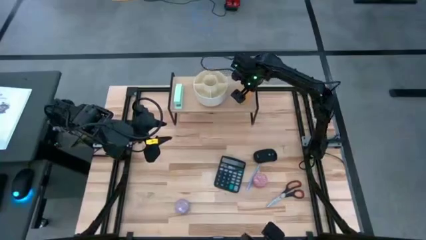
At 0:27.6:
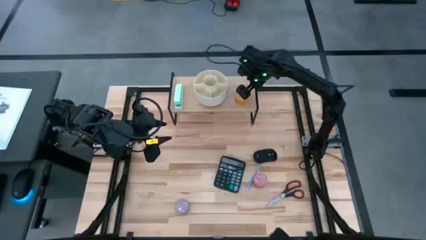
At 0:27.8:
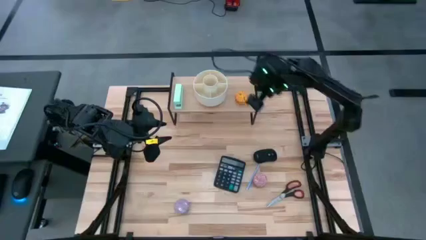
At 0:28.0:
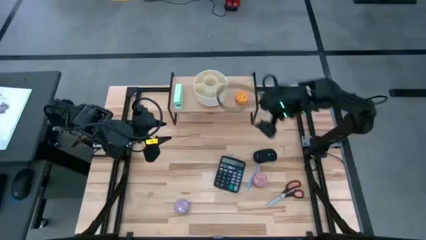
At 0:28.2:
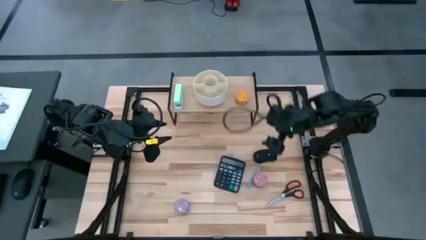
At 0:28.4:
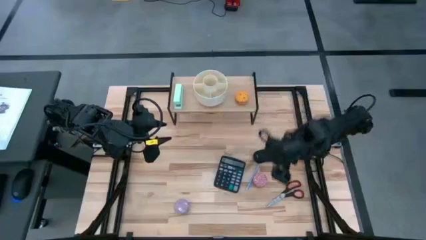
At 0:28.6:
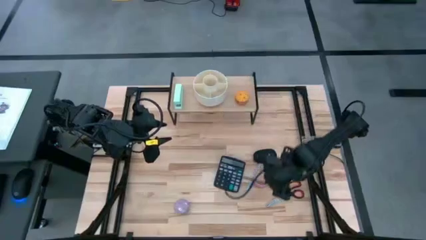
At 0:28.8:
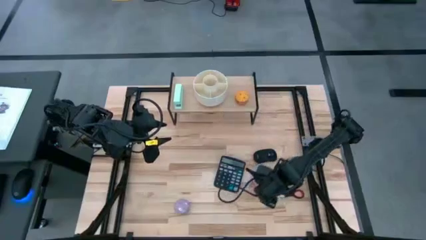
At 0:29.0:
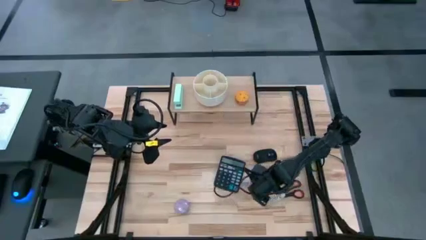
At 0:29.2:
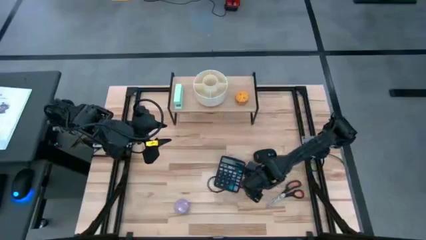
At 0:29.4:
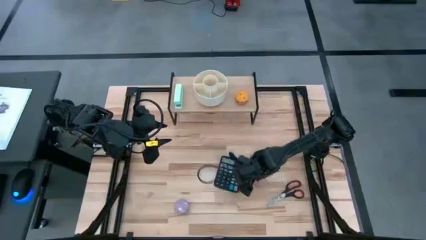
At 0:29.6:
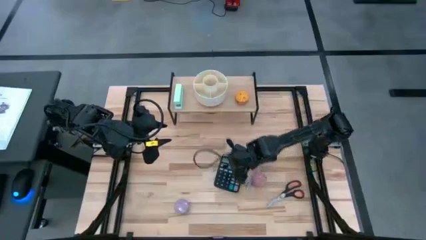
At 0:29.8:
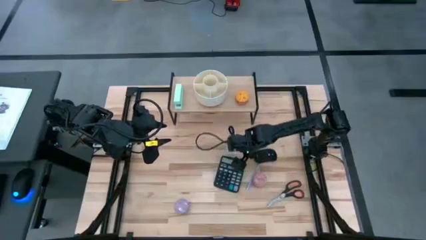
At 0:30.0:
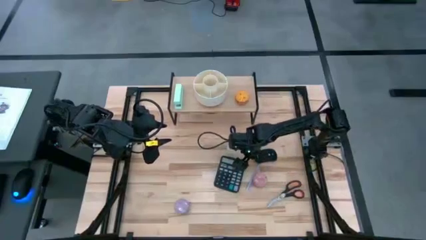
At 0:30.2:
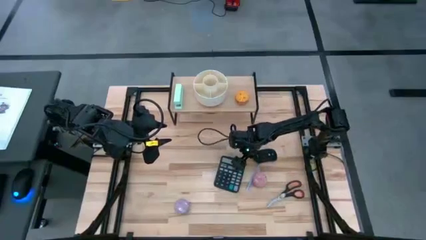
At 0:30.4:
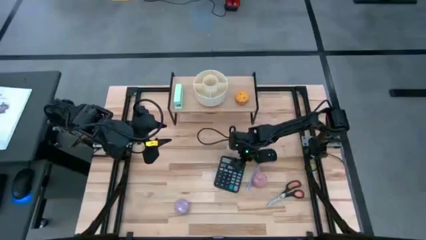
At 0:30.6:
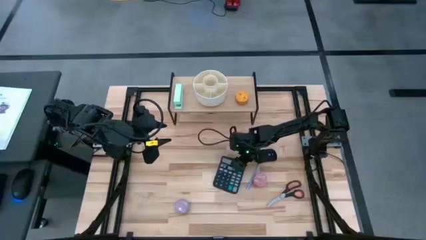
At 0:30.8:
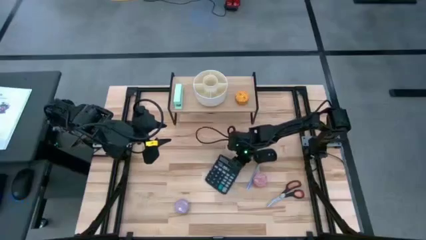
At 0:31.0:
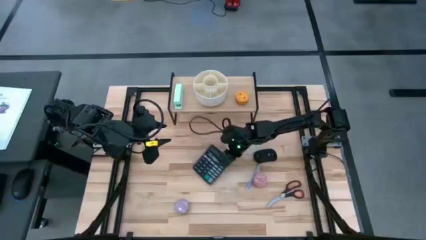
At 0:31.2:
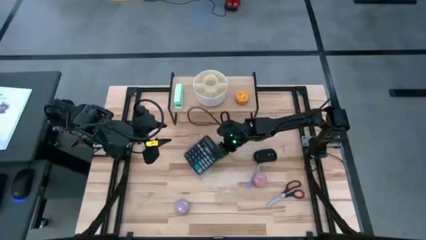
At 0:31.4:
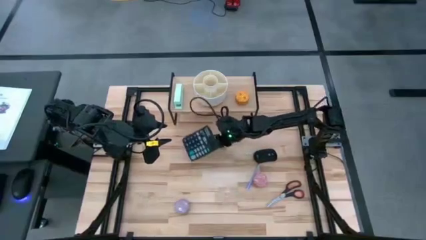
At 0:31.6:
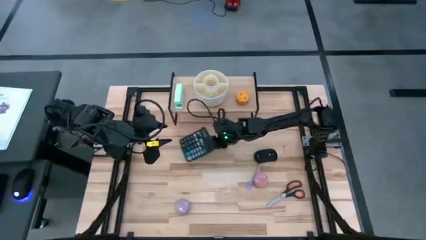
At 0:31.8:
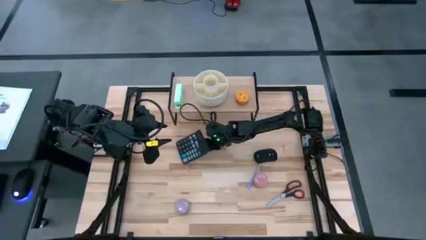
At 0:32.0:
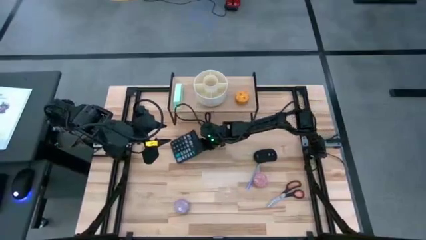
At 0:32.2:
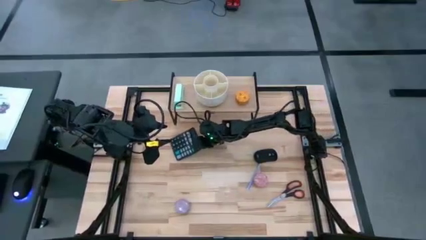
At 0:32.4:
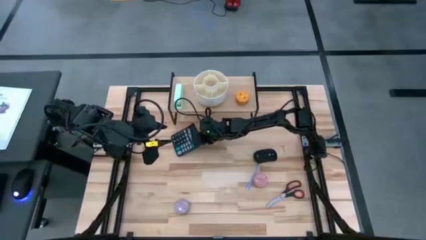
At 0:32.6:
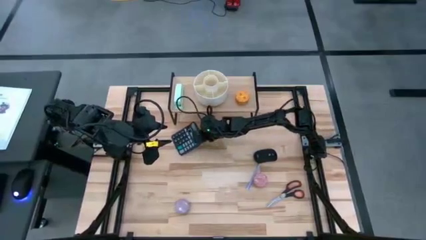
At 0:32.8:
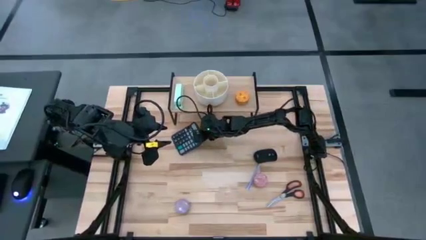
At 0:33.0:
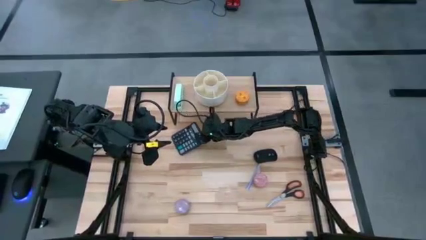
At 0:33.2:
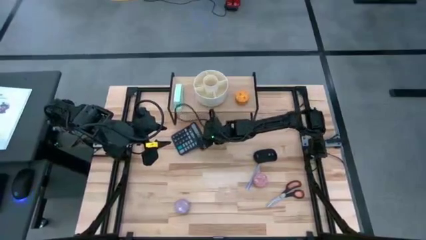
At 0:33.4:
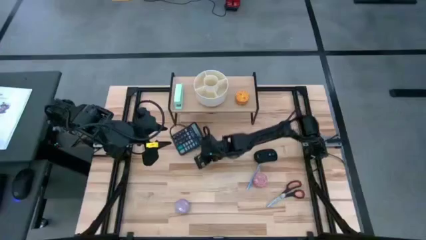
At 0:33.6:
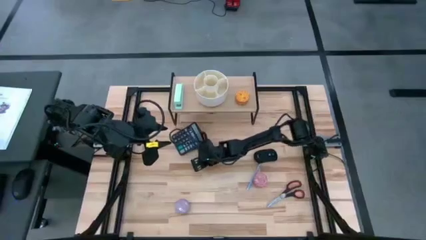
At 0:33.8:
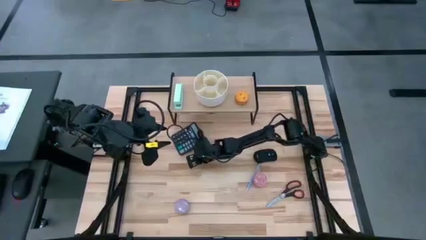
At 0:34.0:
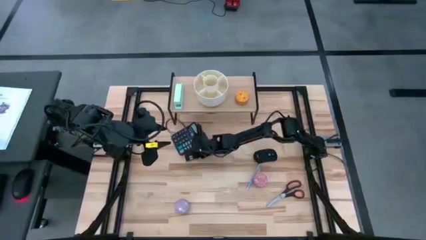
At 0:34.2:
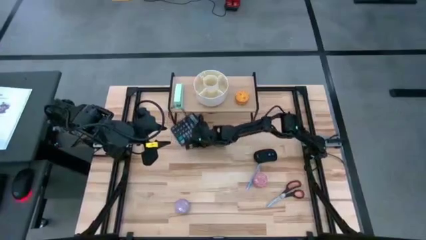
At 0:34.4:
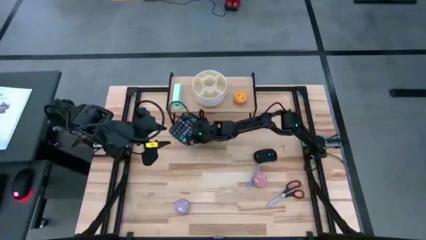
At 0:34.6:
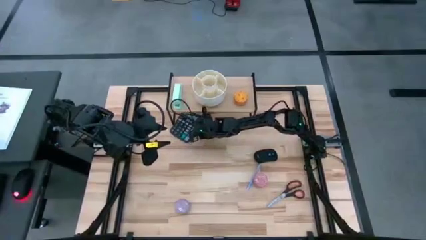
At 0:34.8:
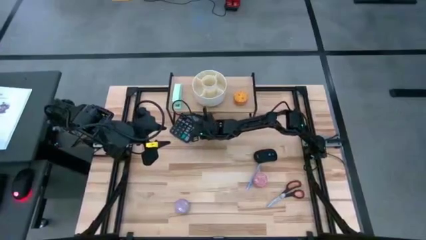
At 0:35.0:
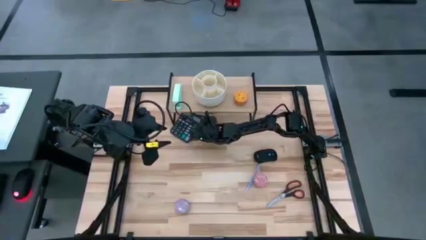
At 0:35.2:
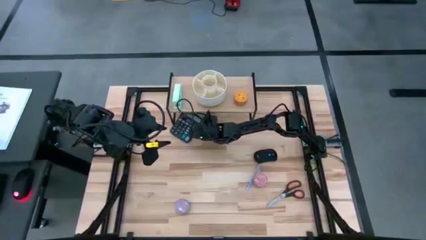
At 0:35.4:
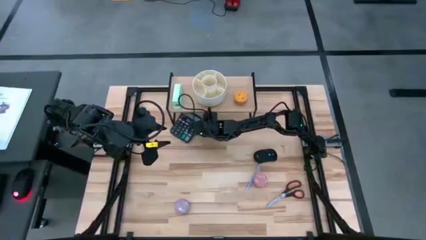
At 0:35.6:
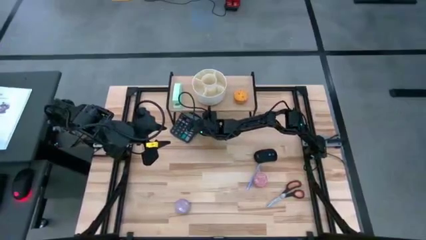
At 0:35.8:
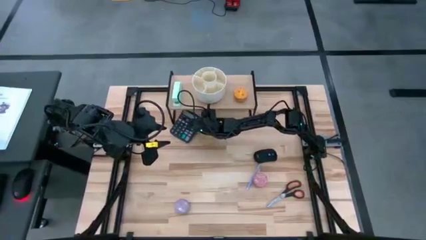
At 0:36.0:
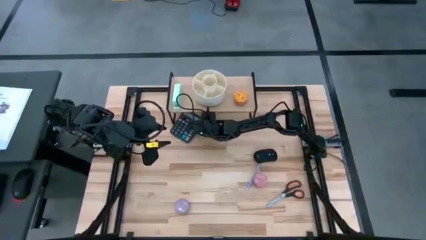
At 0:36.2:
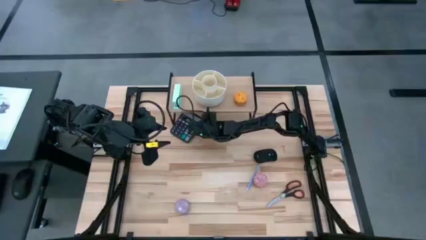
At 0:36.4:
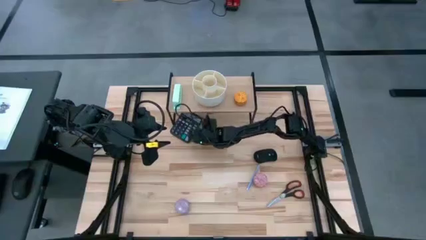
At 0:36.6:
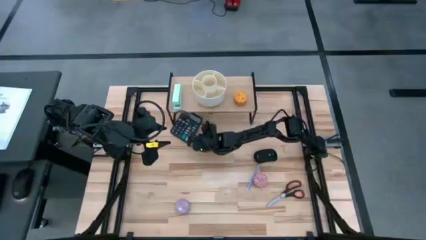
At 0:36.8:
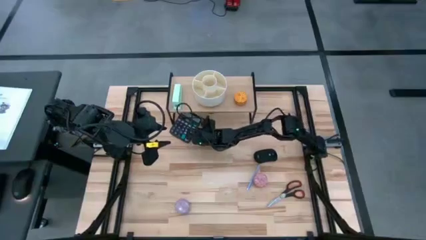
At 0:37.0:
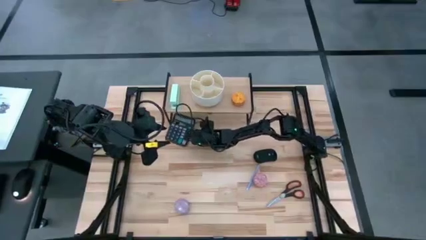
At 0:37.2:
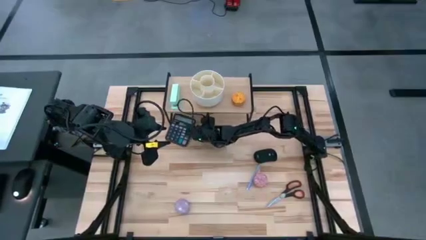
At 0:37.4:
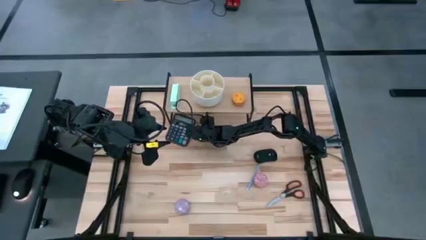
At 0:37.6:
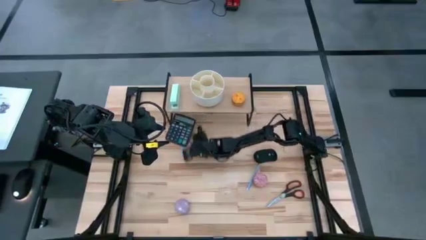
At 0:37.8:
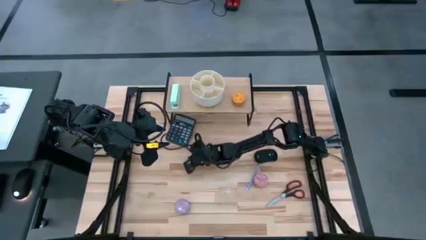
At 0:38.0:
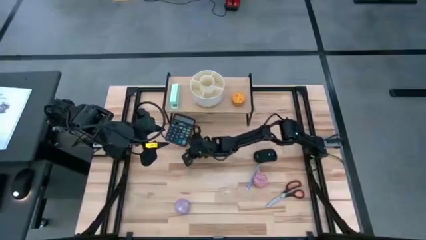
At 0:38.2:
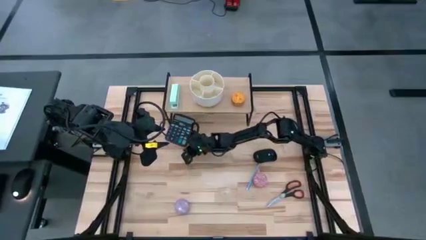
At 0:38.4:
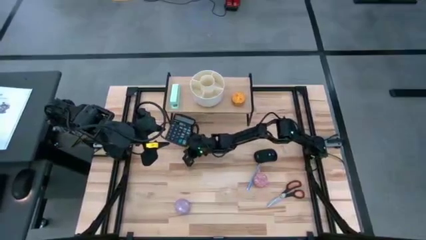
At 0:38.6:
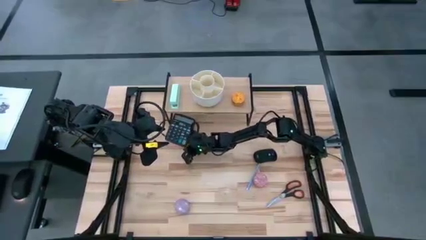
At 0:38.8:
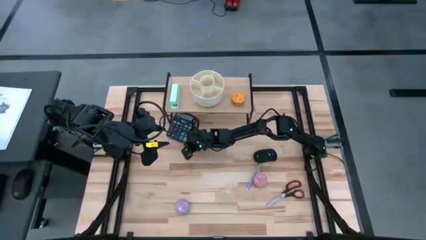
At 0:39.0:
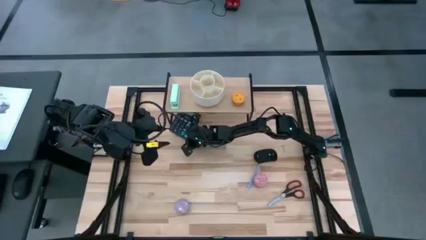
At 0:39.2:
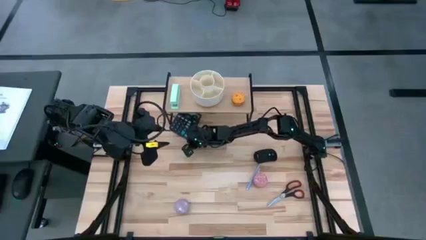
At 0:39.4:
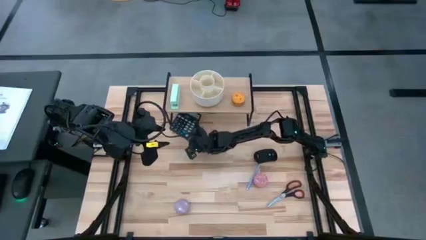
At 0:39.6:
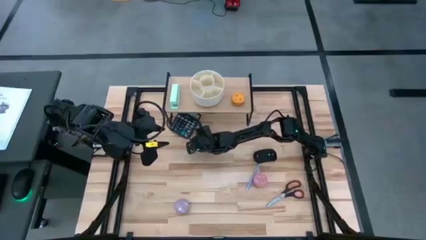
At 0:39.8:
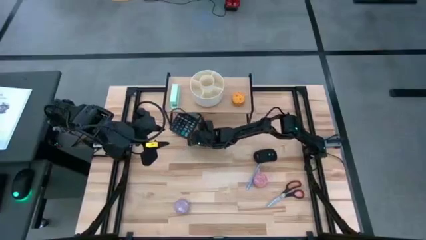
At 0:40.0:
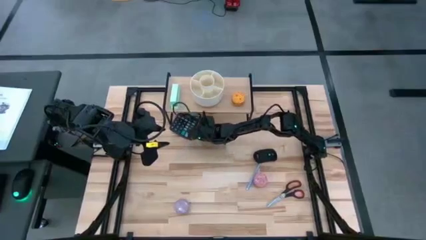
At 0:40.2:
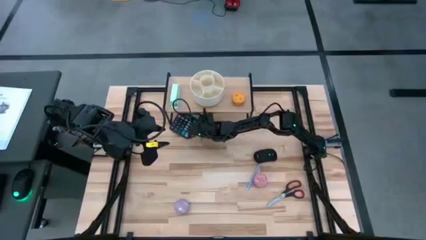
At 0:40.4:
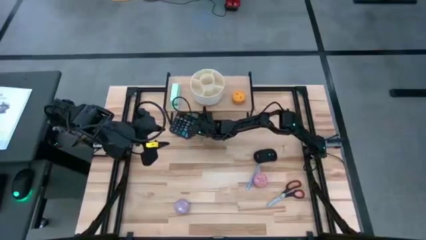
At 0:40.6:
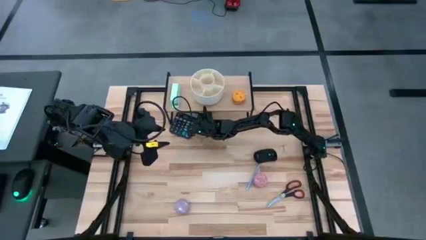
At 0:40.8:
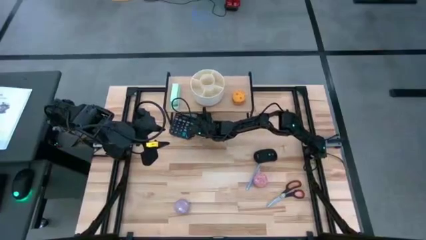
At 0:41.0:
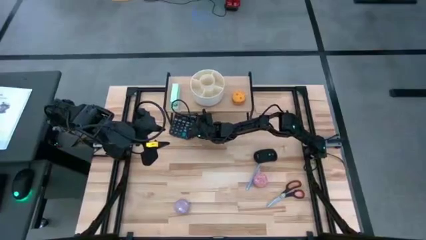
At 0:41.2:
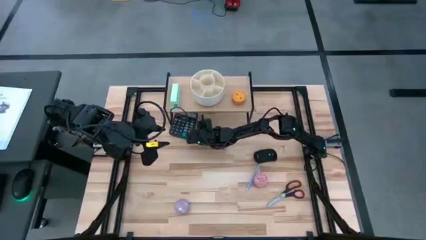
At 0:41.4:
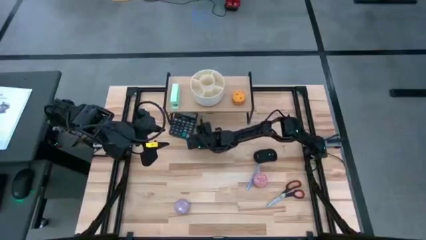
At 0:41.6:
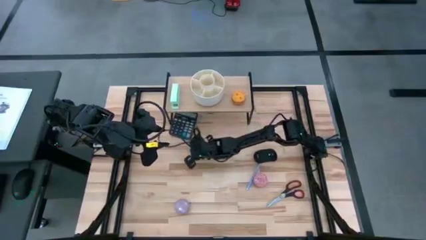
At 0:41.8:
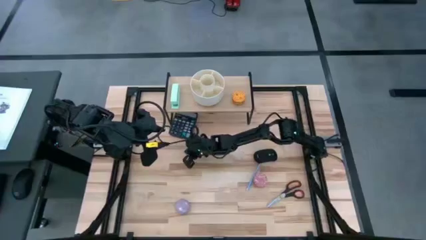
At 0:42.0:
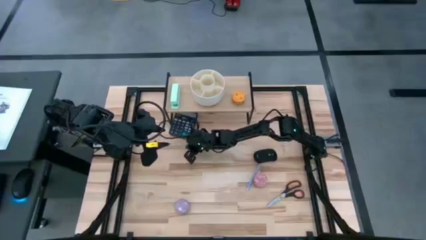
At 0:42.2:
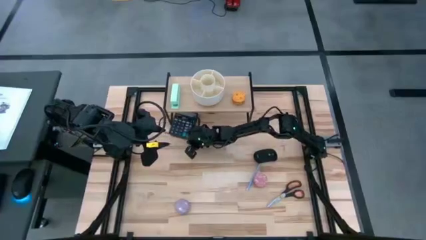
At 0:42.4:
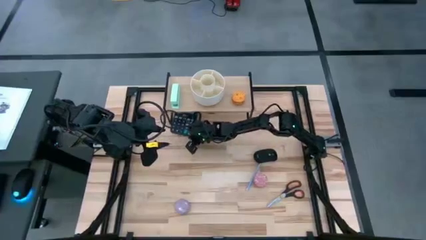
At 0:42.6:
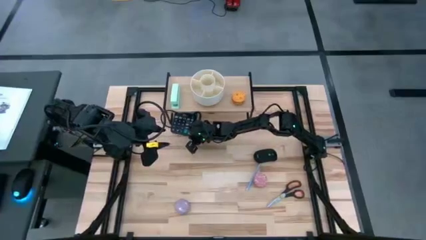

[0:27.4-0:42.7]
Task: Stock shelves
Put the black calculator under the shelf
